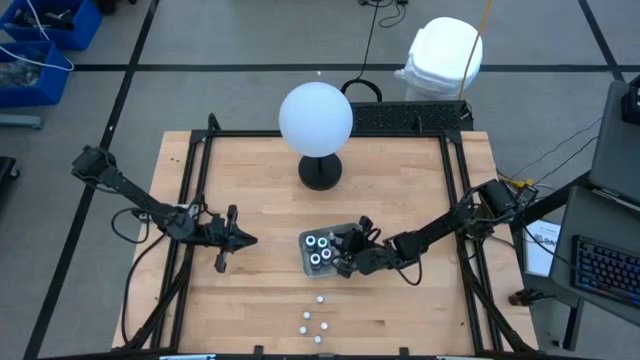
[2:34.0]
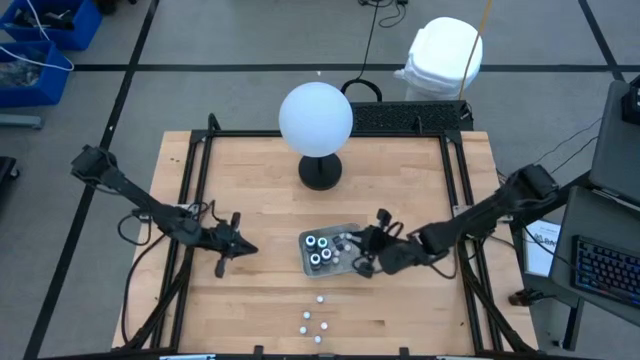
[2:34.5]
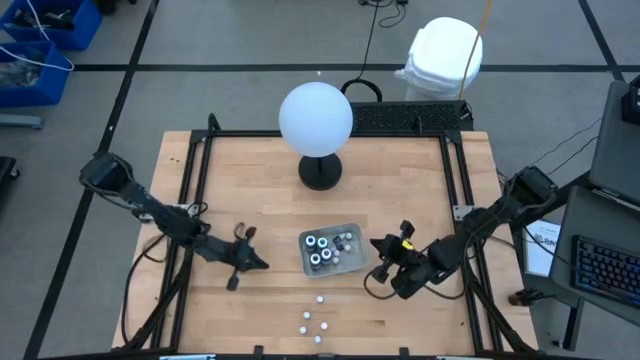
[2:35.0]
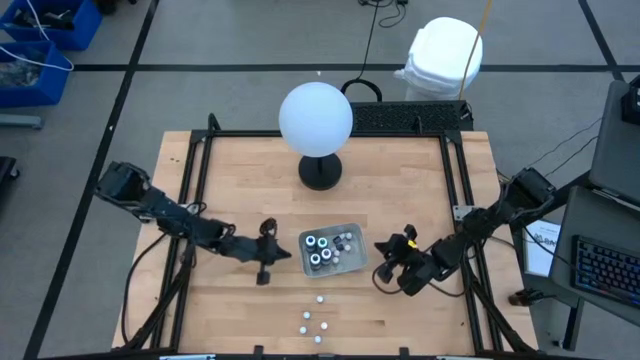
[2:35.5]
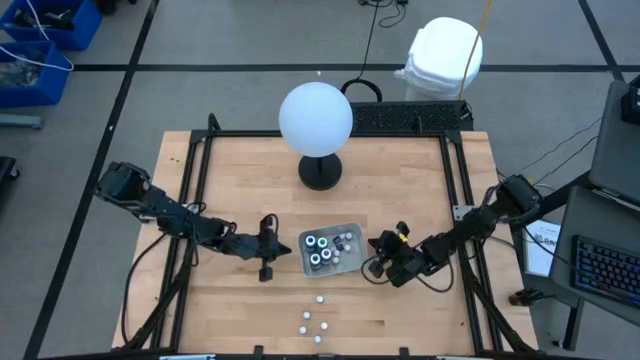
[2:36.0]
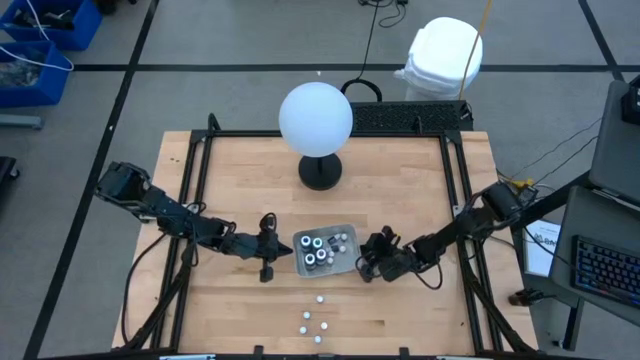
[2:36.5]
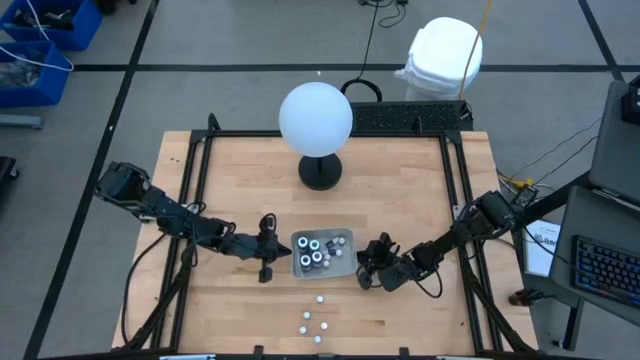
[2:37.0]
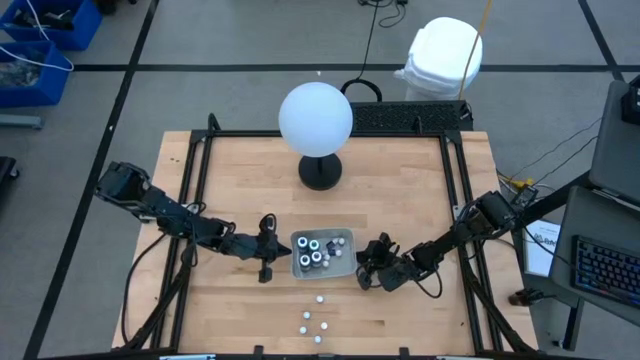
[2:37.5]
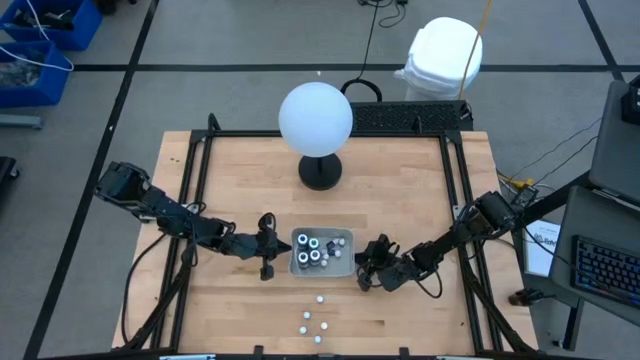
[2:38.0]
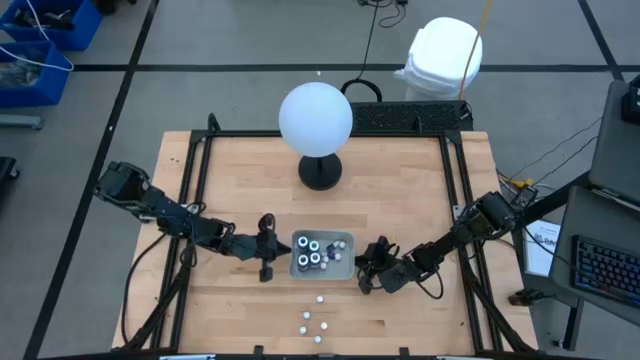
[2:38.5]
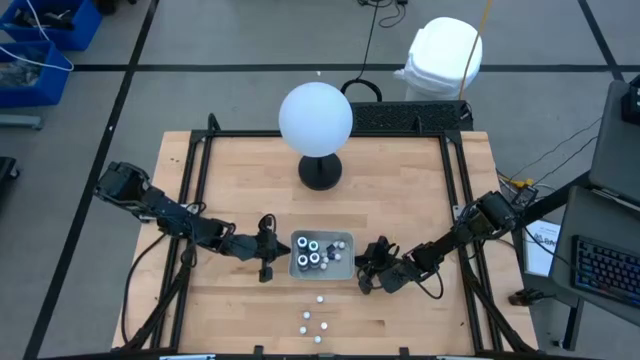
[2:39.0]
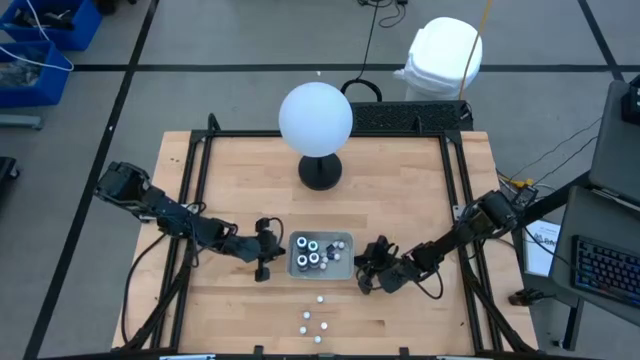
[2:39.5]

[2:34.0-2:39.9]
Task: Pick & Place food coloring
Adjust the gray bin

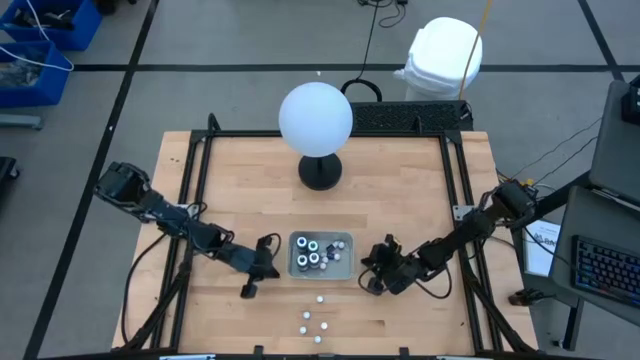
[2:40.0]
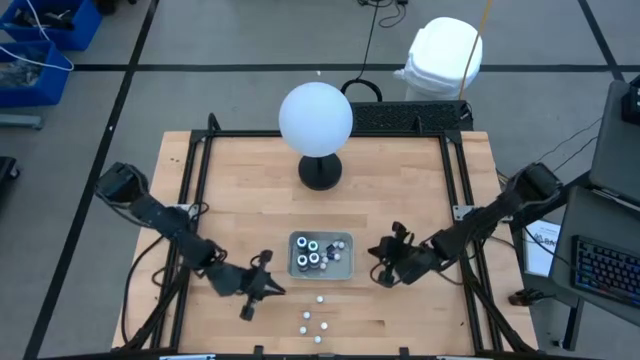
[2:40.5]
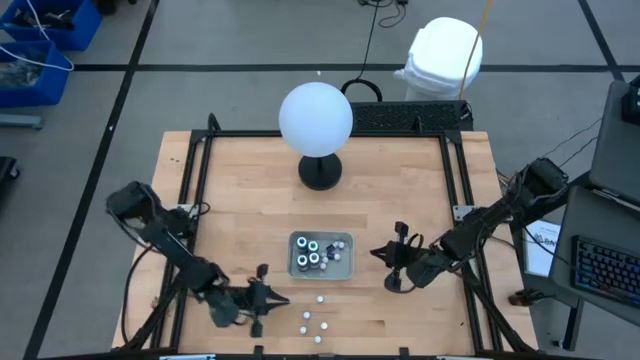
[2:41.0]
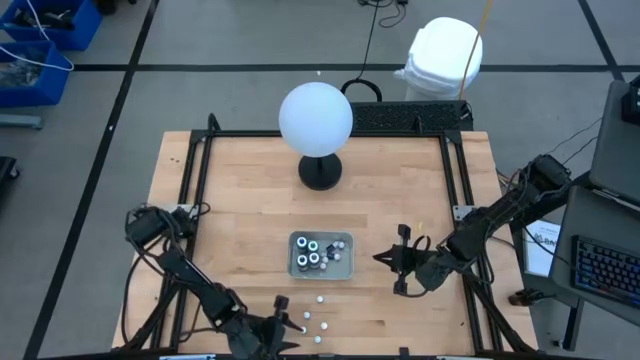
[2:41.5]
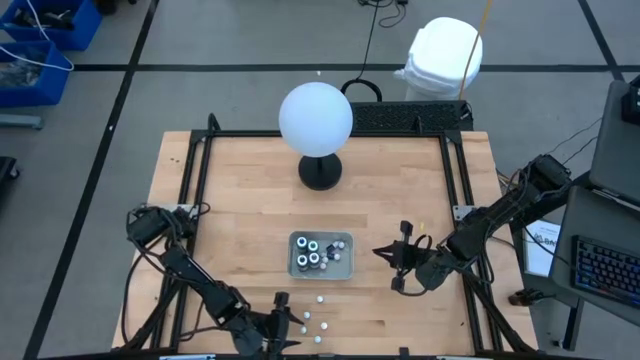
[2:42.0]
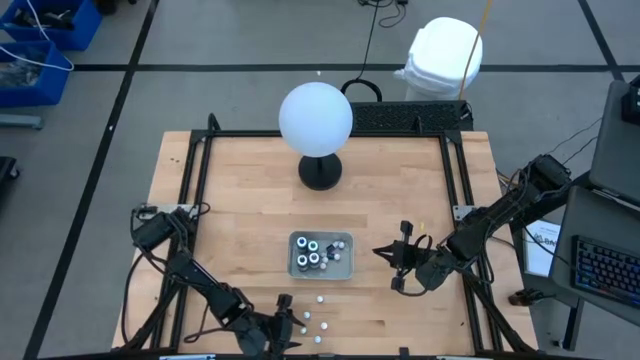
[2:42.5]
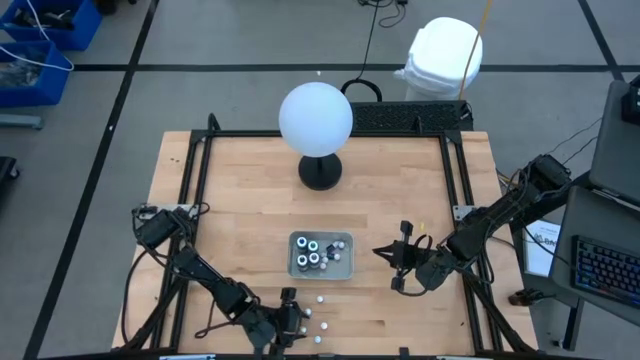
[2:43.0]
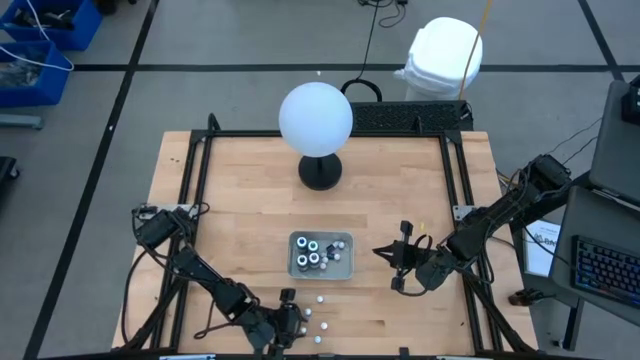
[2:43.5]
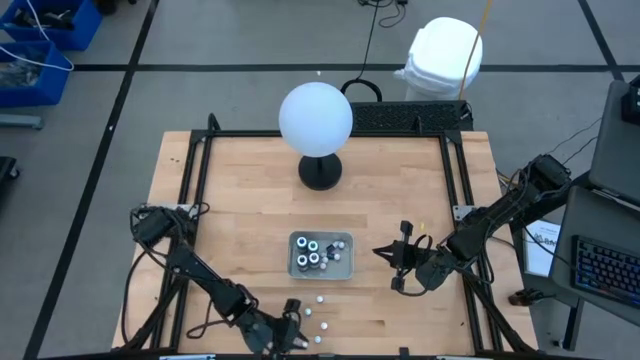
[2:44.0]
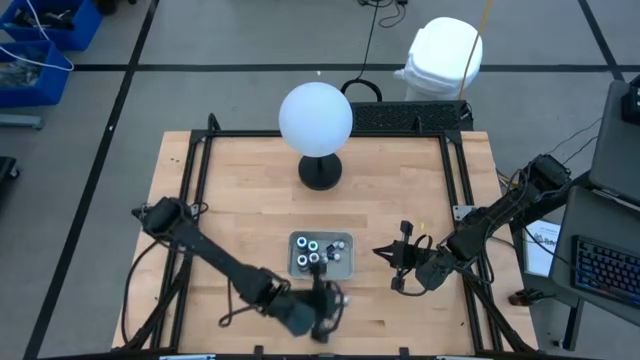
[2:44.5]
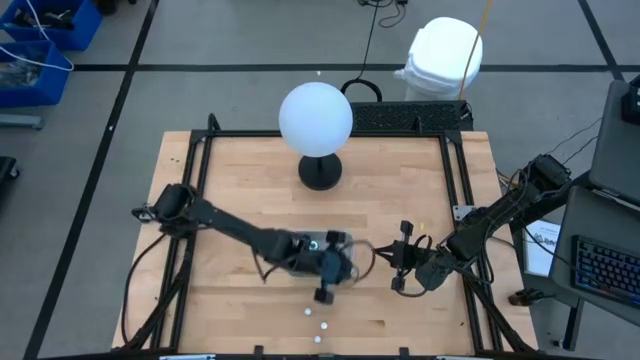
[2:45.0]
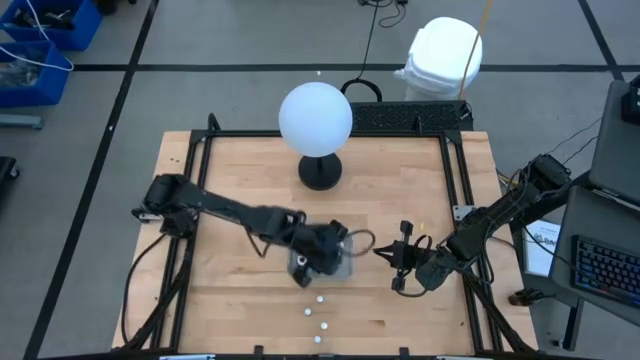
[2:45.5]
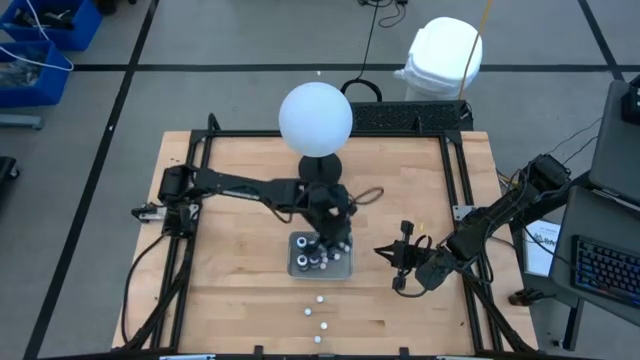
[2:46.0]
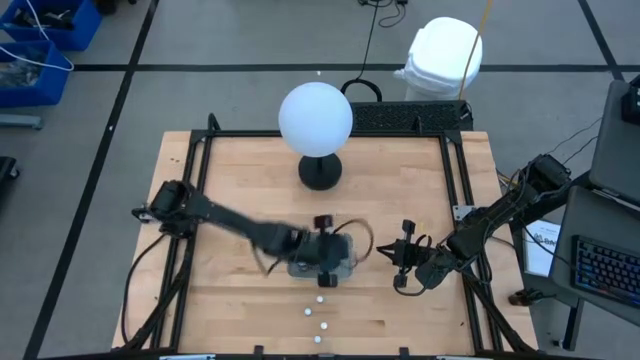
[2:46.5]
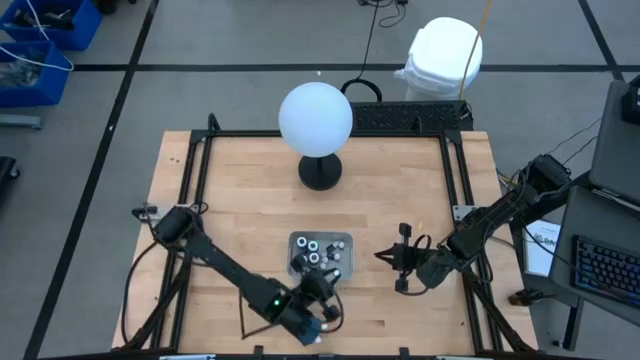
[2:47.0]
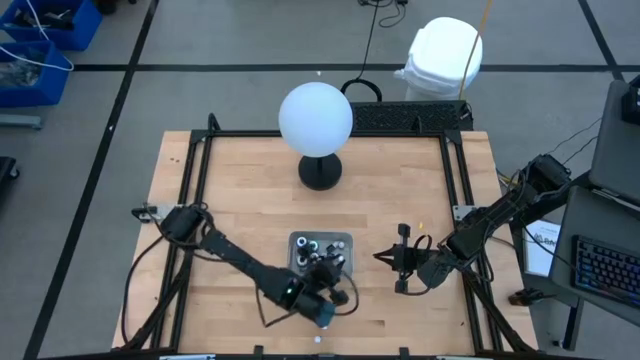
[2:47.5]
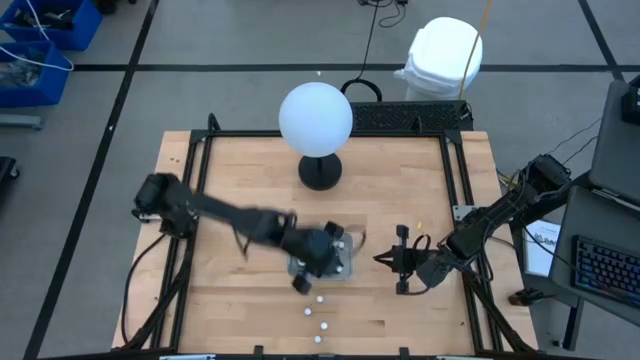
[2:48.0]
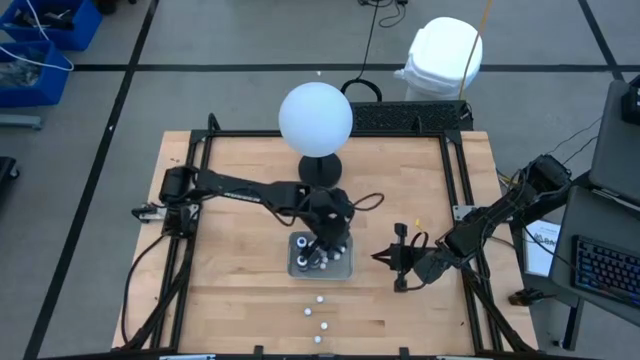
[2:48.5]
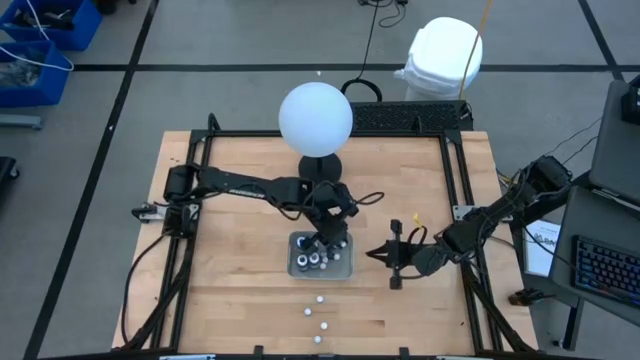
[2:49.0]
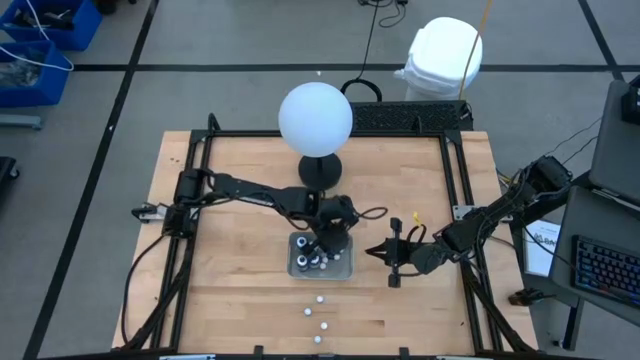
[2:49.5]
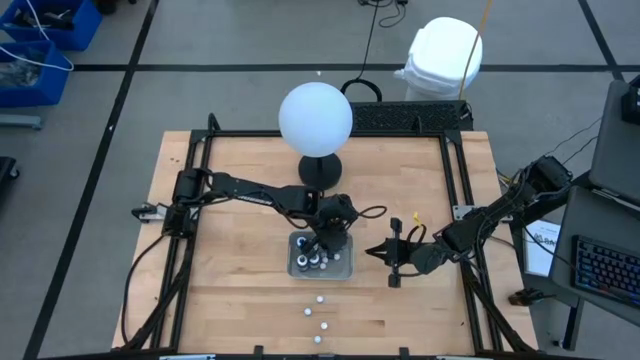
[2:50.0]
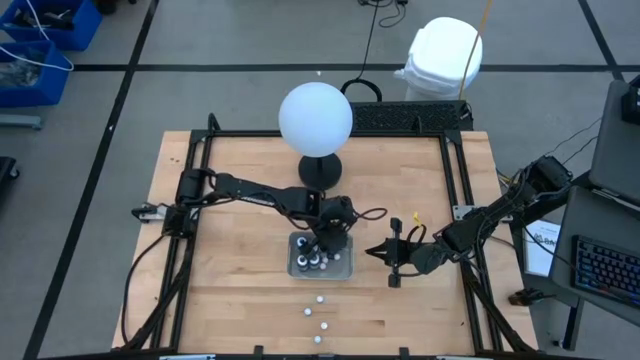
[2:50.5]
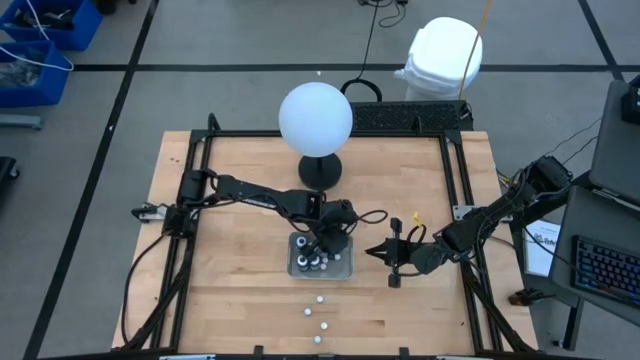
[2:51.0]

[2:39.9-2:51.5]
Put the small violet food coloring bottle into the gray bin
